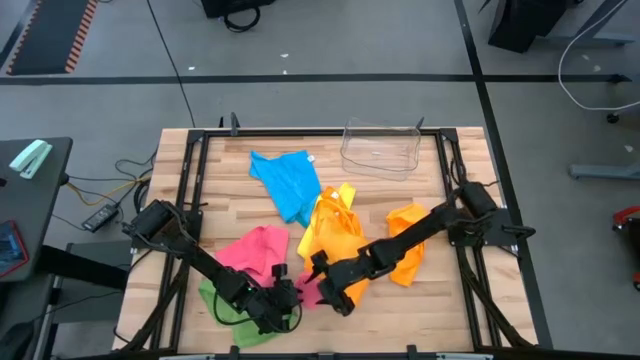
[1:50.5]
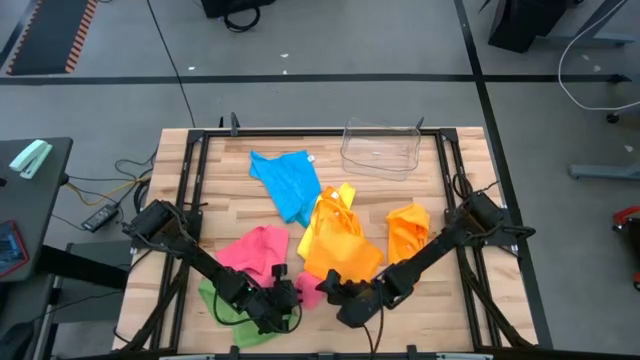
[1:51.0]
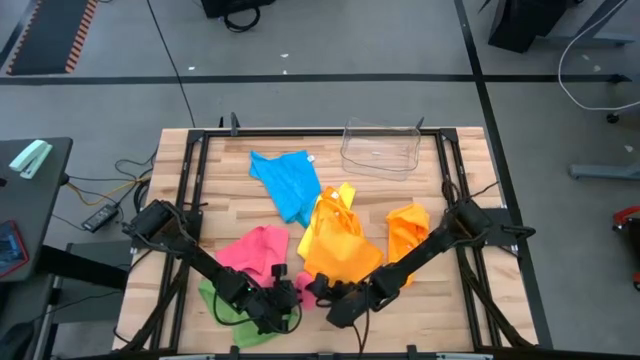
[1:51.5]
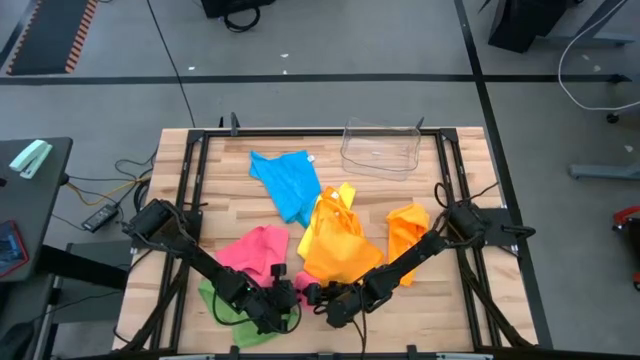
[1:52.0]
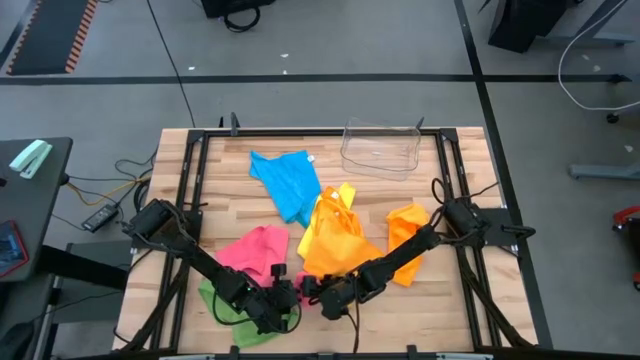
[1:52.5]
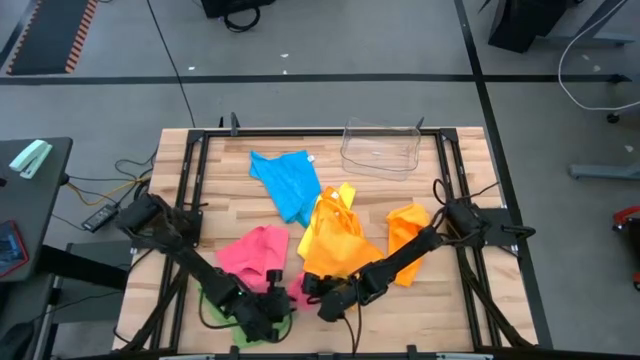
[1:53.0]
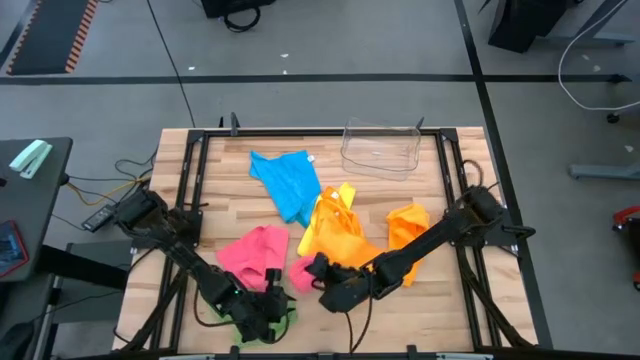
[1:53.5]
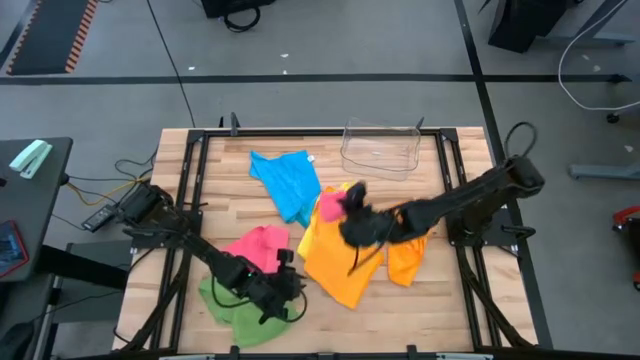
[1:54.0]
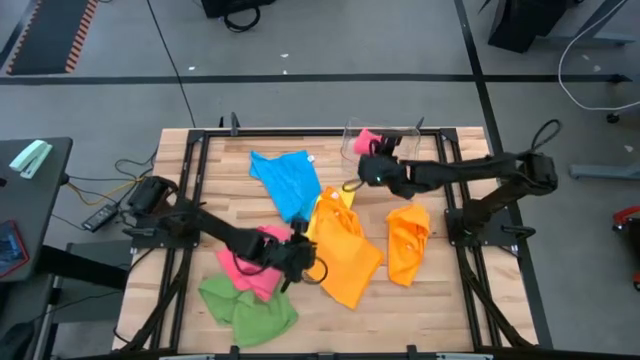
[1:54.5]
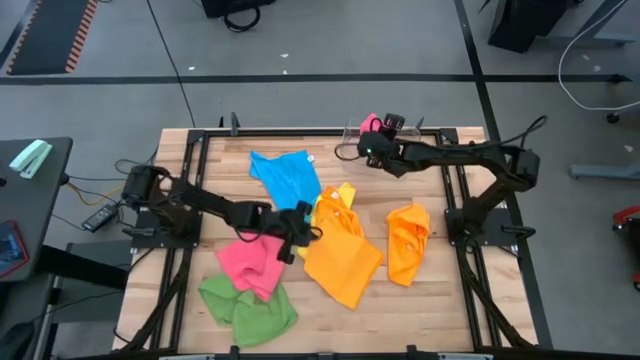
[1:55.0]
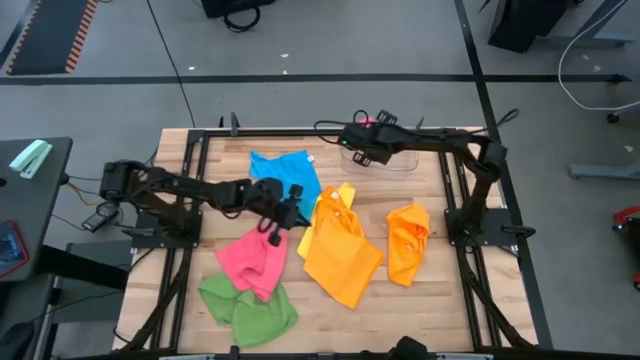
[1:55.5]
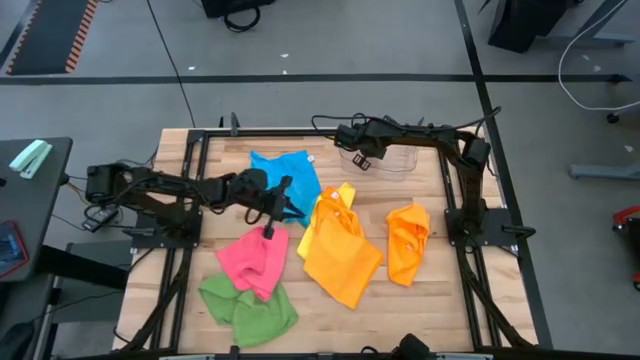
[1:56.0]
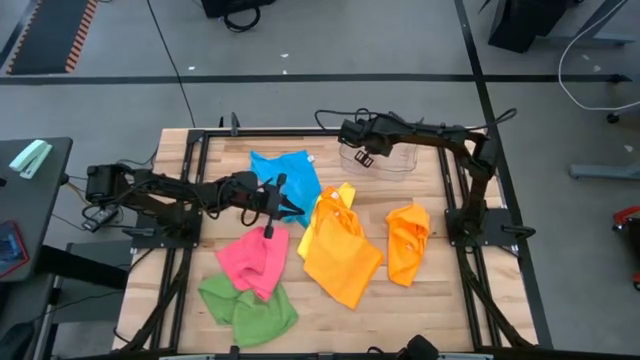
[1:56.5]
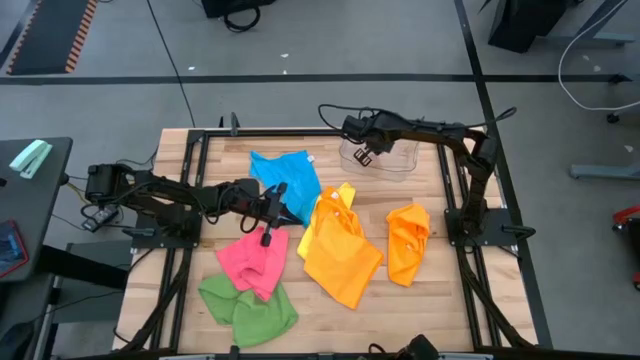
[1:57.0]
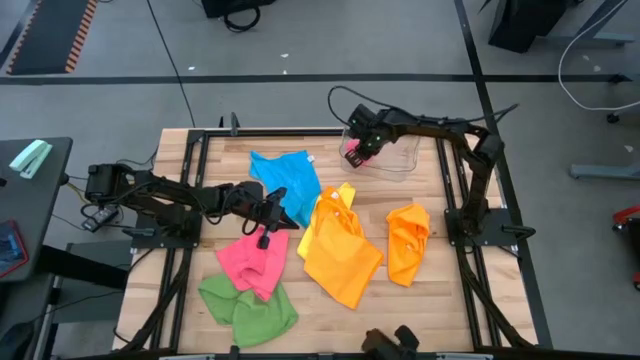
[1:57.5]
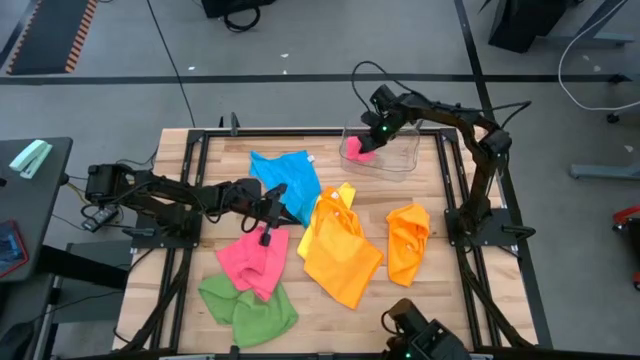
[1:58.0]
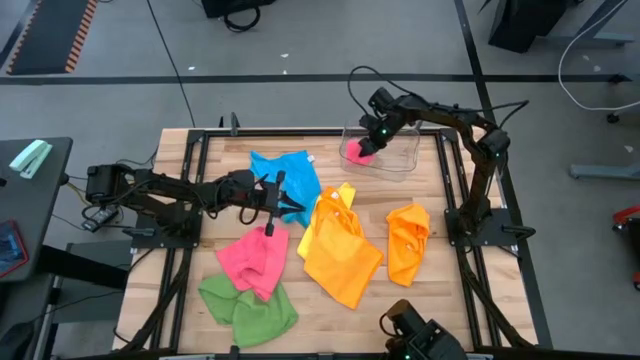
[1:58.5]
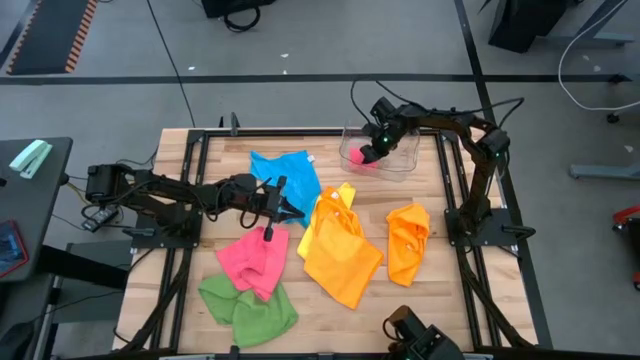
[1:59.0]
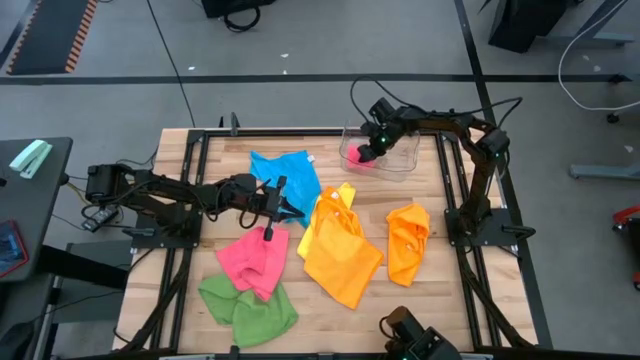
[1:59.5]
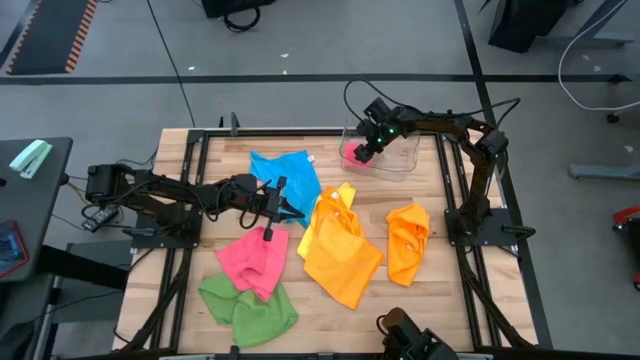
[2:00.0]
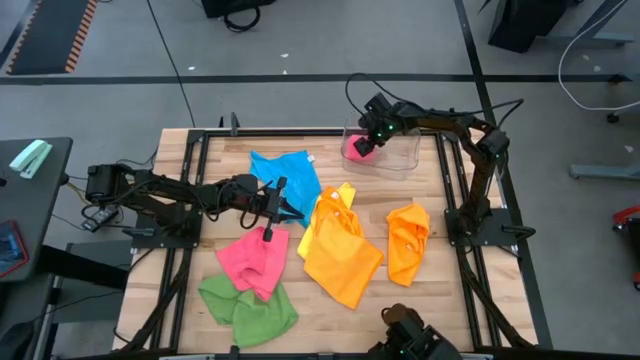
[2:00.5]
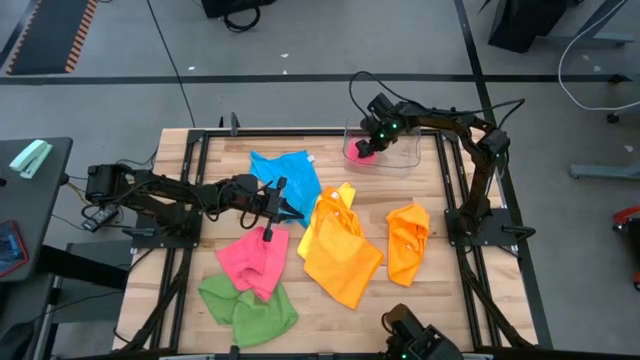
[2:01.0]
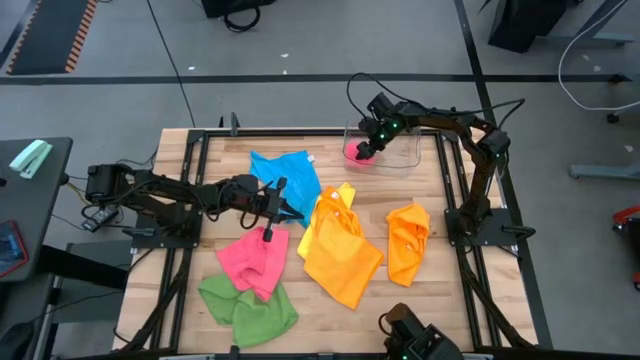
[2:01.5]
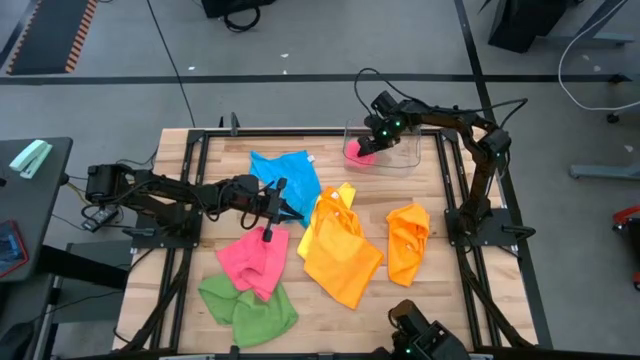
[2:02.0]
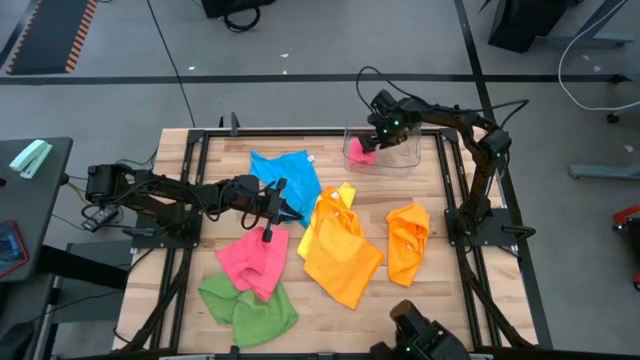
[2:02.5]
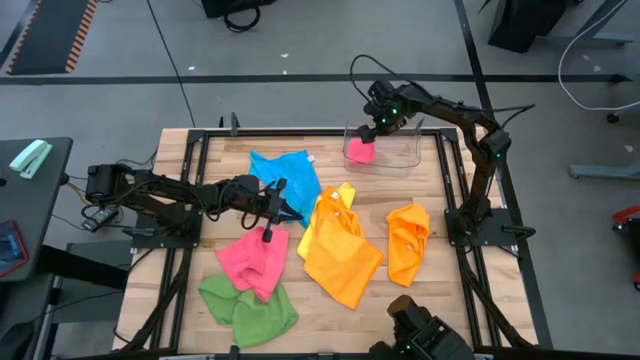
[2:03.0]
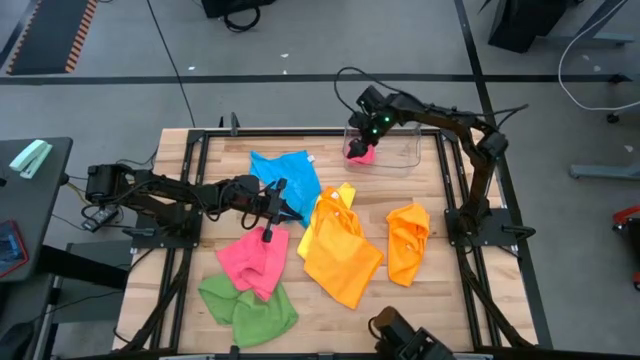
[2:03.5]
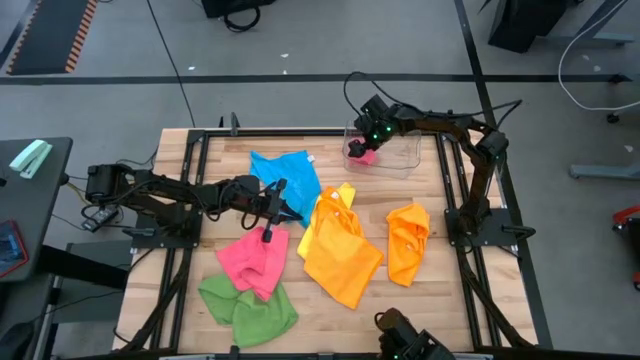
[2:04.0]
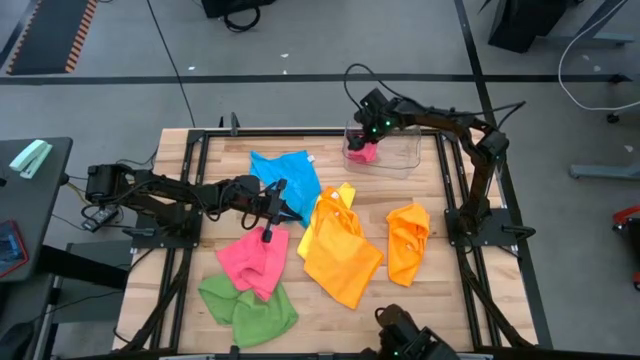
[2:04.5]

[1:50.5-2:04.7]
Task: Fold microfiber towels
Put the folded top pink microfiber cloth into the transparent bin

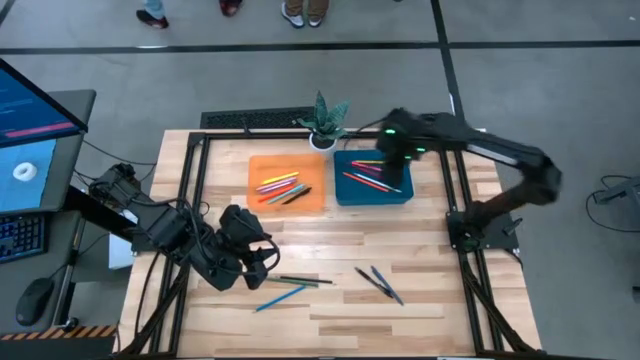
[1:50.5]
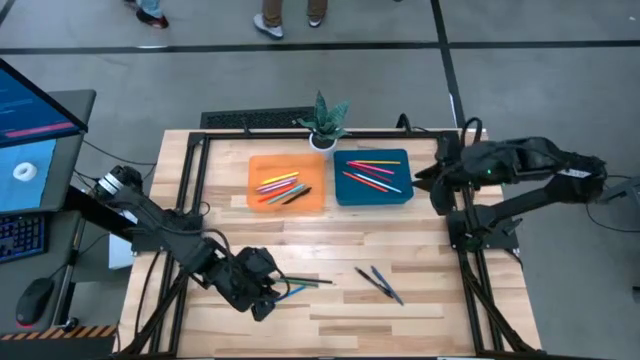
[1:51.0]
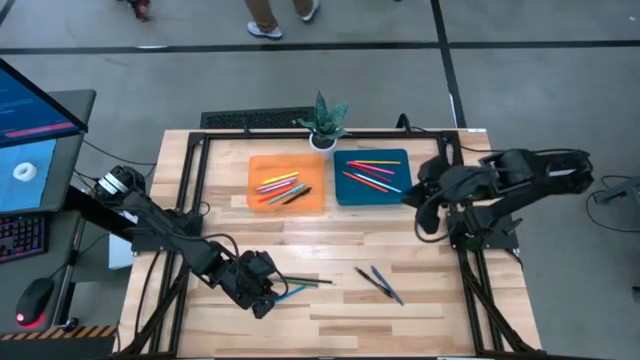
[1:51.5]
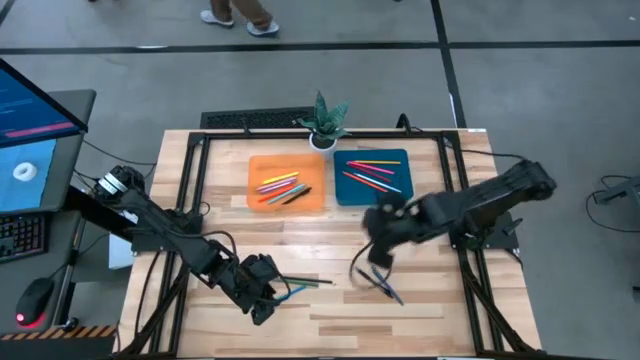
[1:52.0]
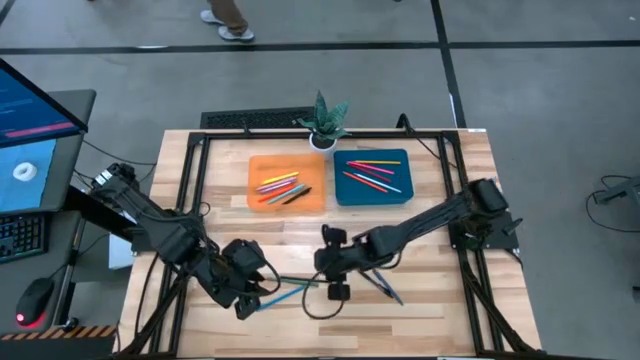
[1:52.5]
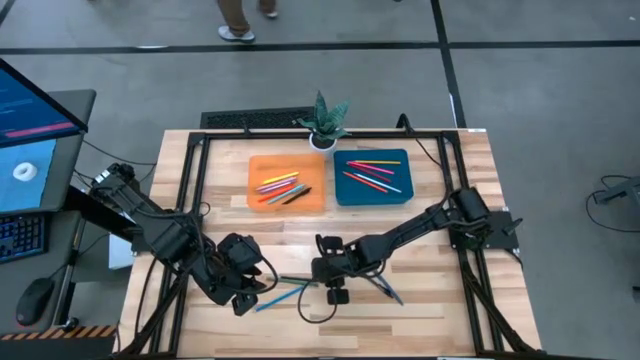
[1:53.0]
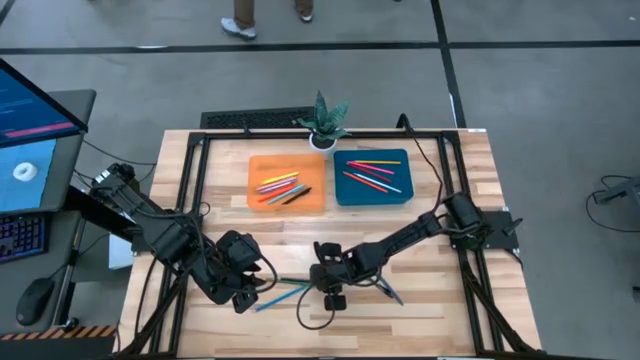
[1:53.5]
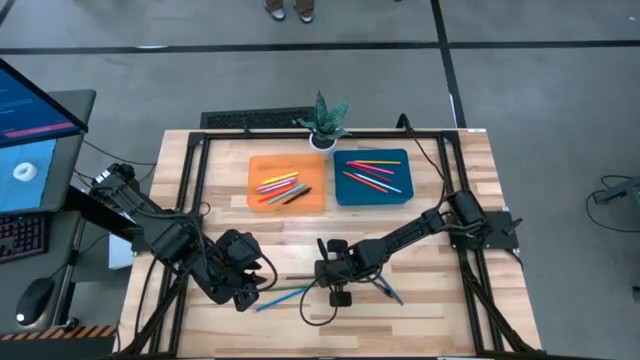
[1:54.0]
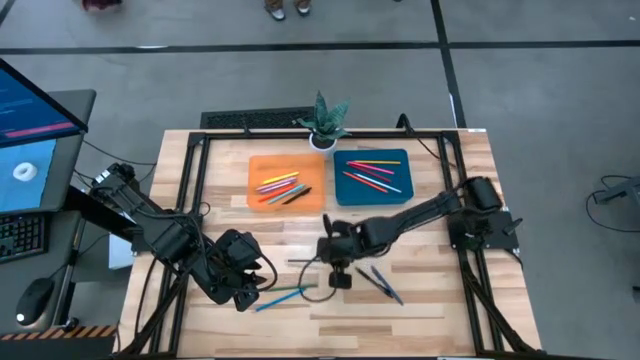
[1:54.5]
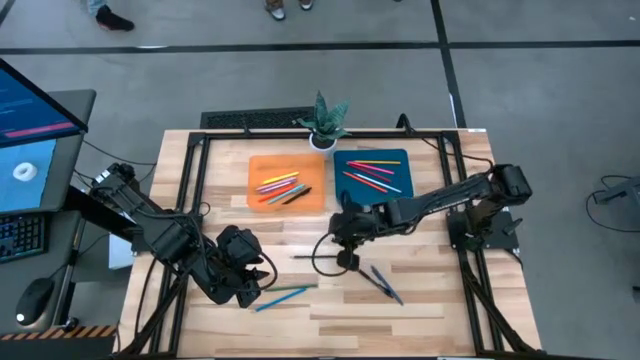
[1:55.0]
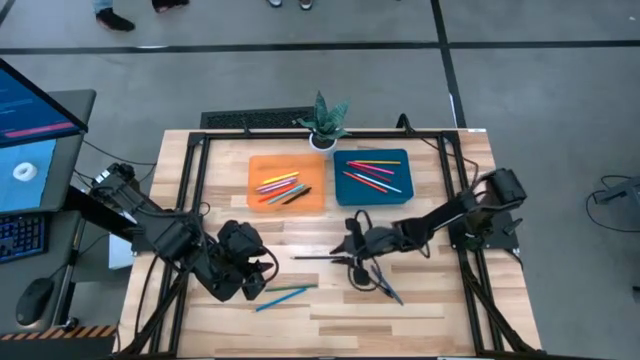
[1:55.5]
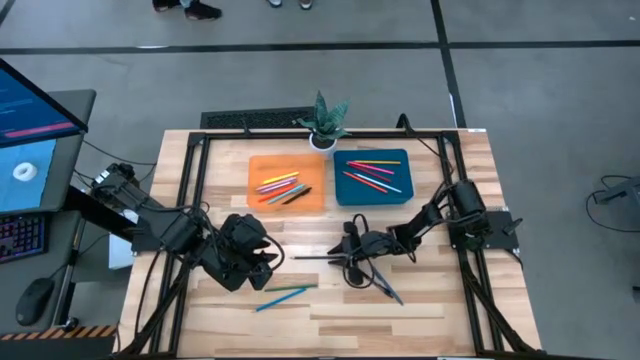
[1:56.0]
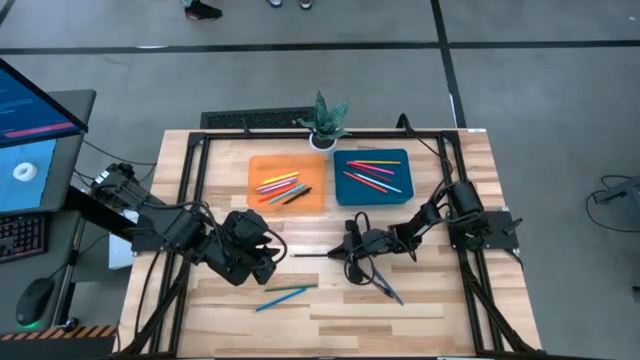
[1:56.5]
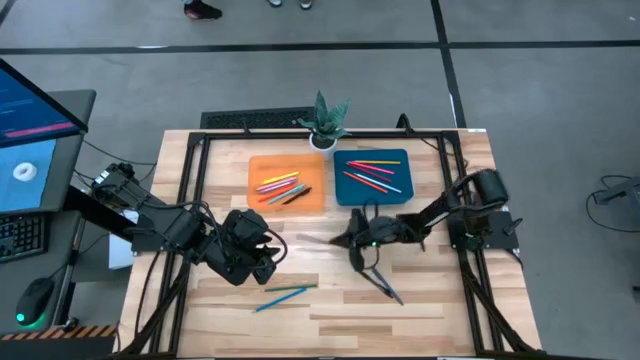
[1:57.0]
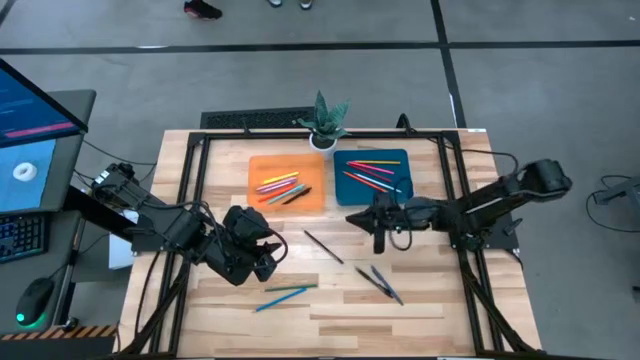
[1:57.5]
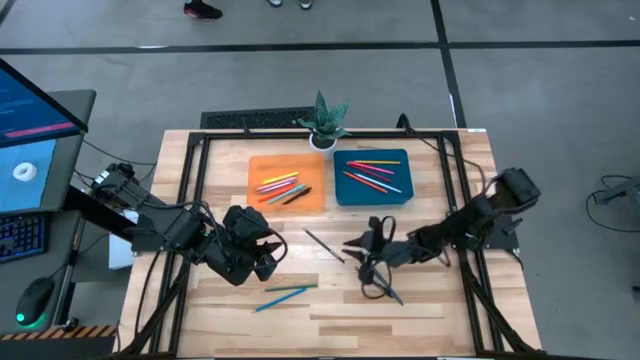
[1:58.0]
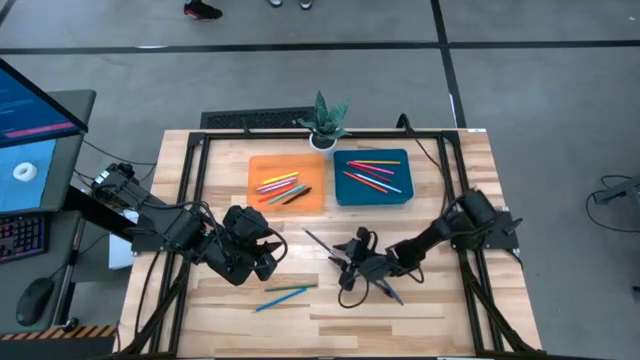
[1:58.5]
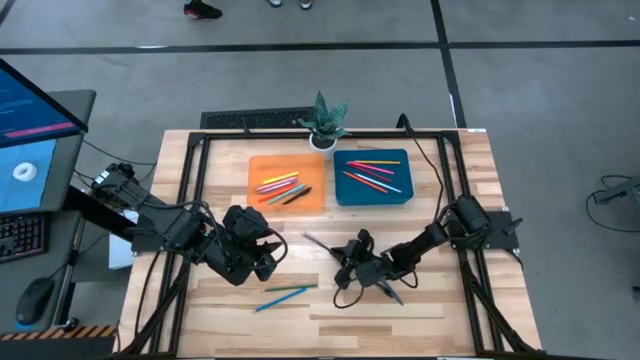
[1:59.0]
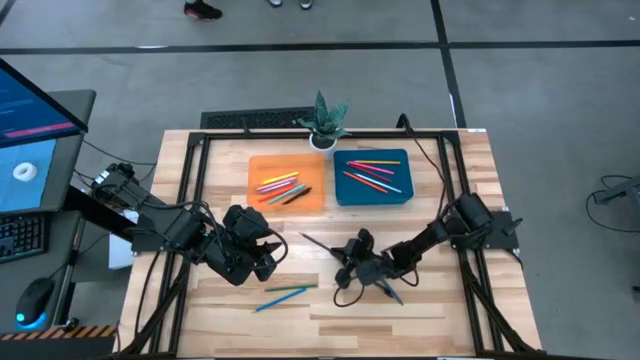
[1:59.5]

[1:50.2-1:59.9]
Task: Sort pens & pencils
Put the black pencil into the blue bin
